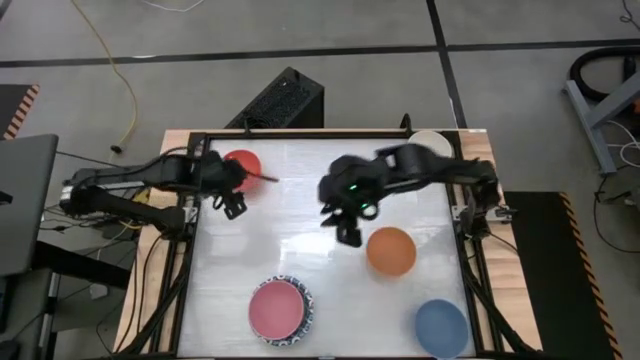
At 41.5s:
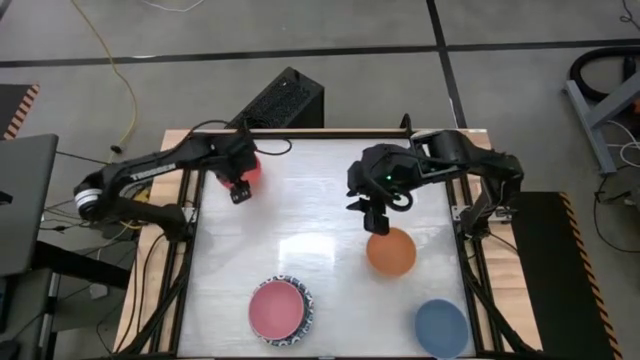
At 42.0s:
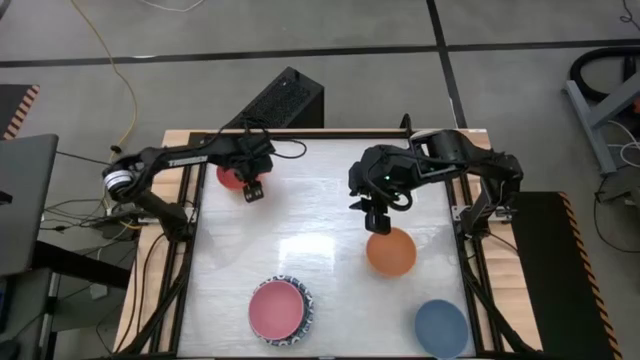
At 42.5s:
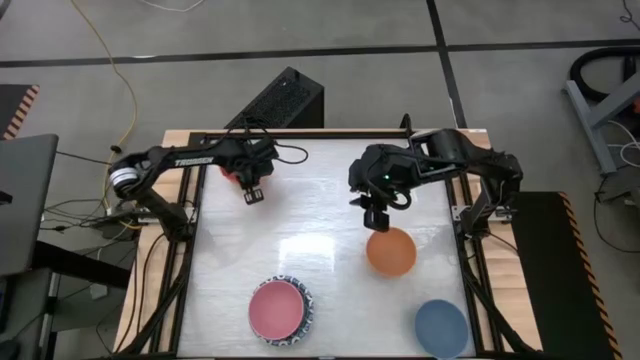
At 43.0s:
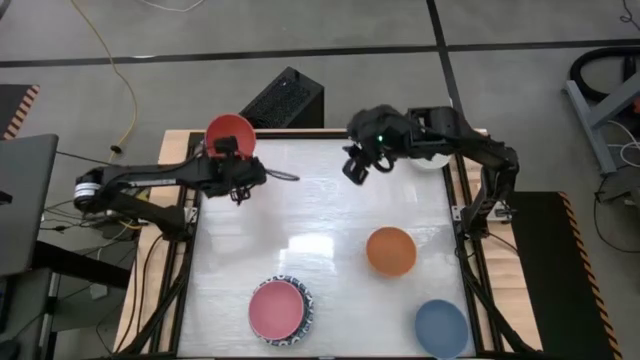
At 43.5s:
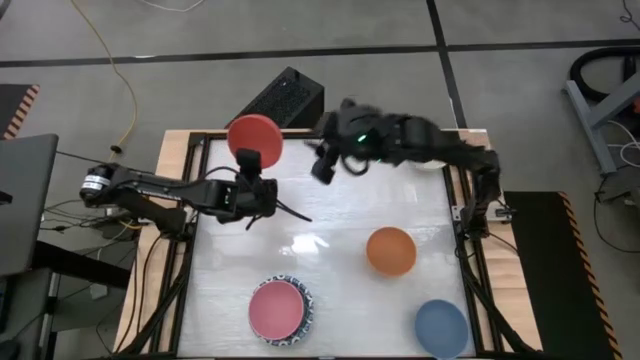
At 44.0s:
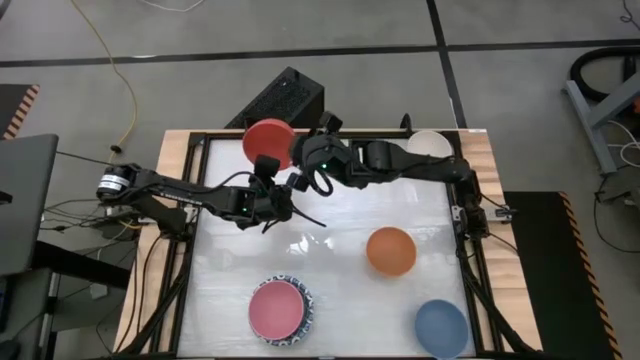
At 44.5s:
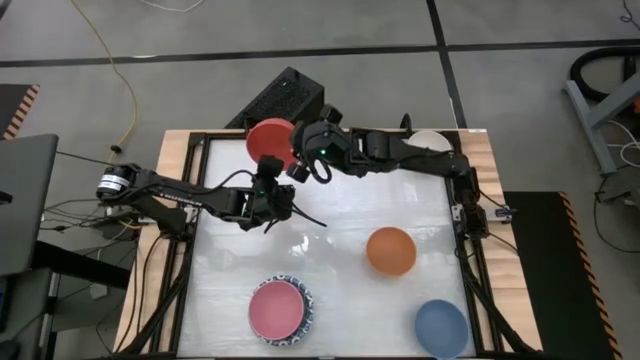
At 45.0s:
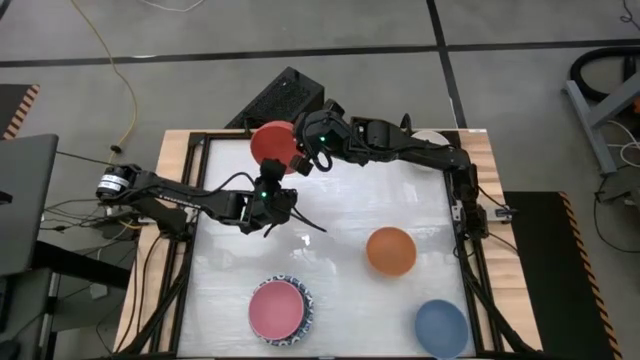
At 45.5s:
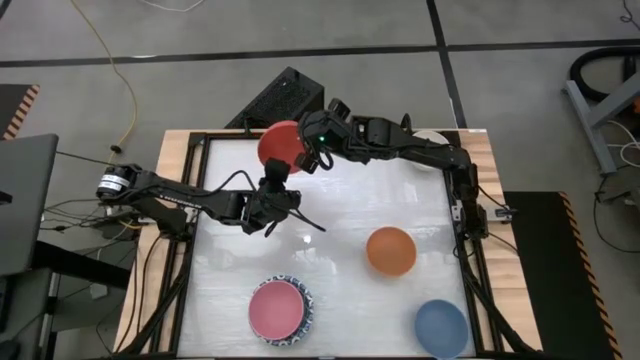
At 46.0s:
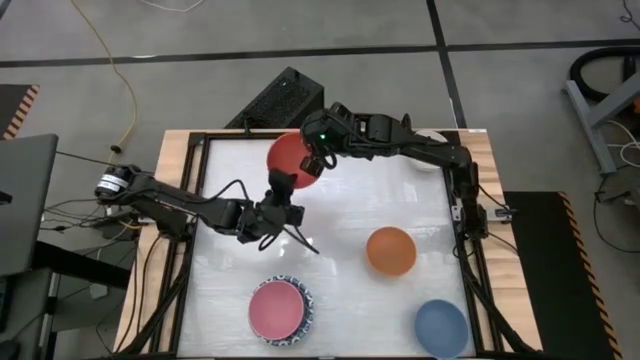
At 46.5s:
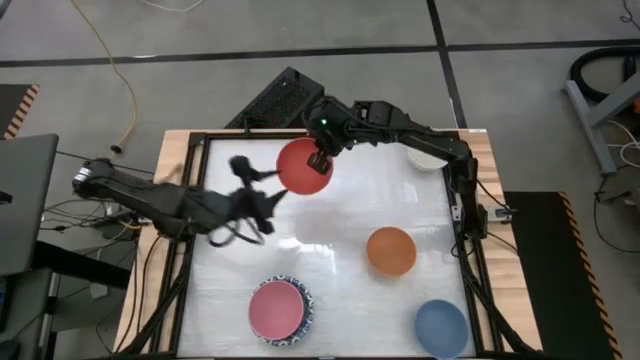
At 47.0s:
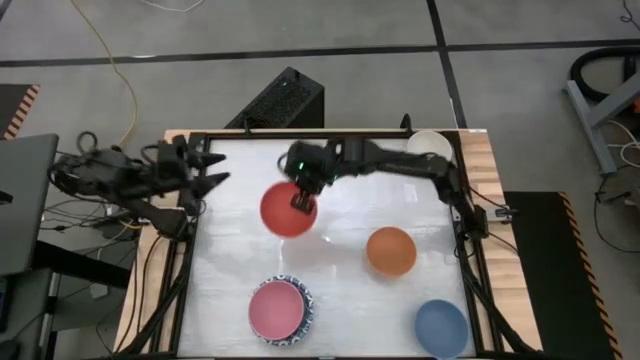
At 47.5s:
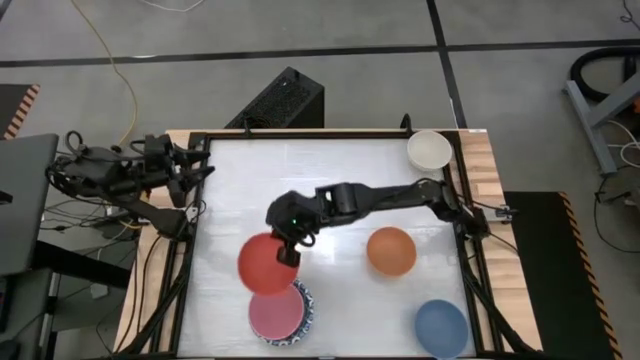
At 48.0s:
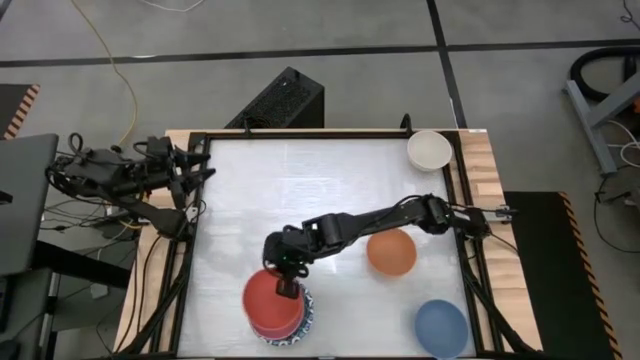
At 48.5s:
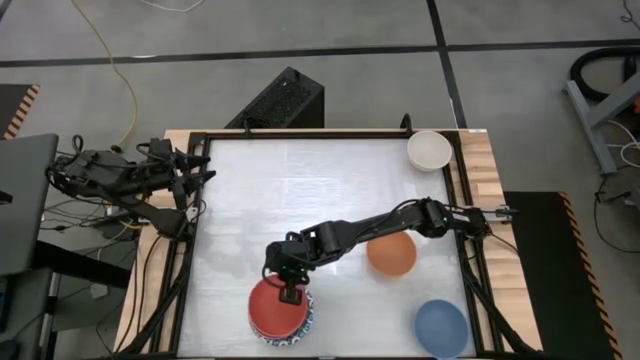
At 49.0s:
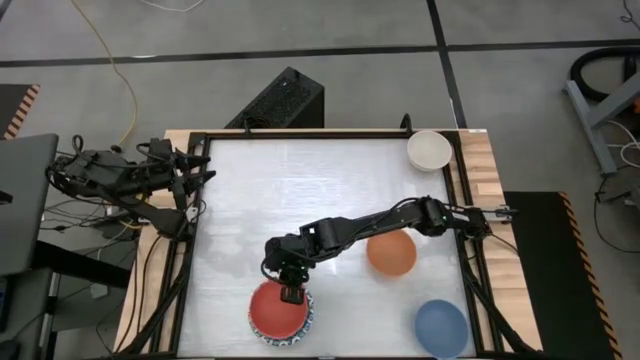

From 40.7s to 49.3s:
Stack the orange bowl on top of the pink bowl

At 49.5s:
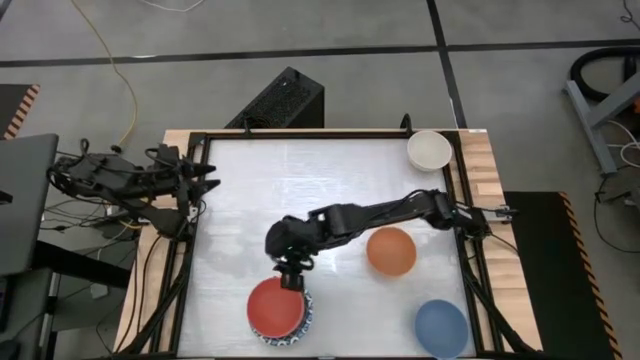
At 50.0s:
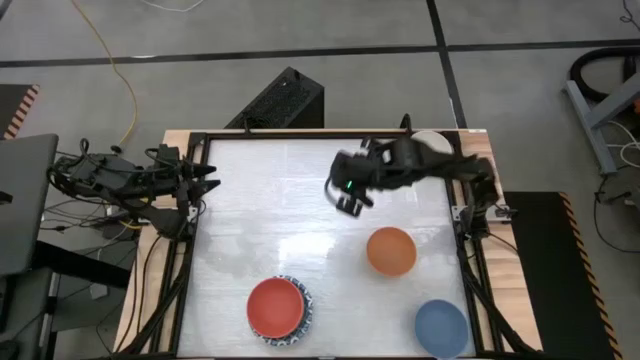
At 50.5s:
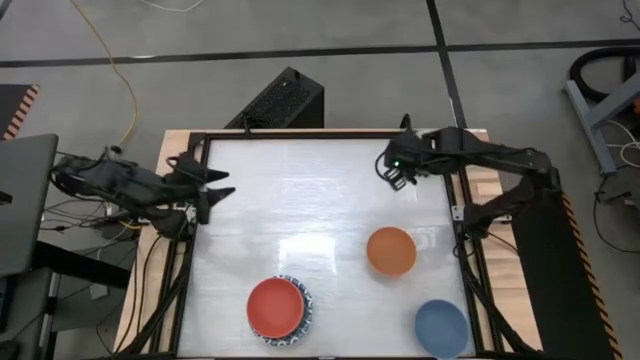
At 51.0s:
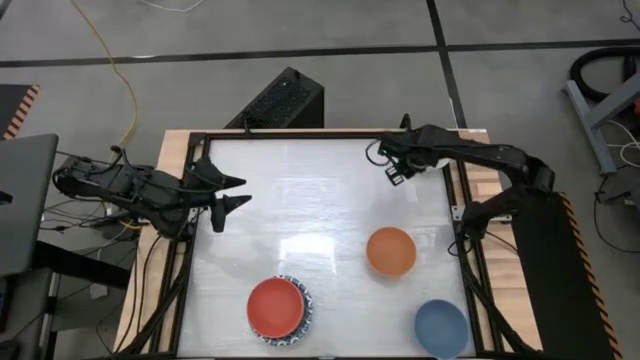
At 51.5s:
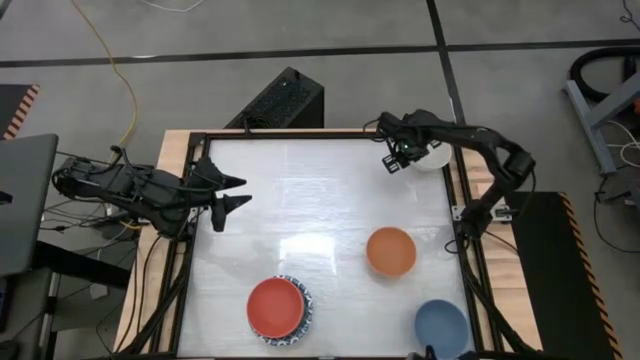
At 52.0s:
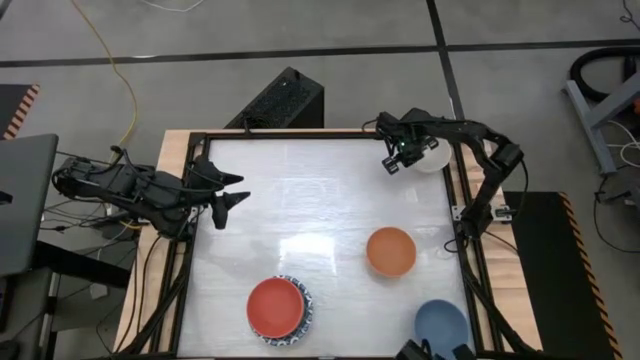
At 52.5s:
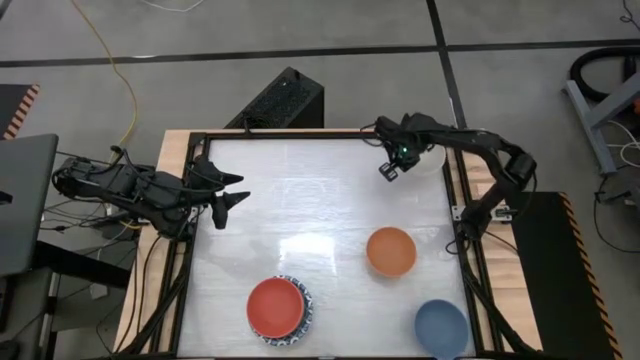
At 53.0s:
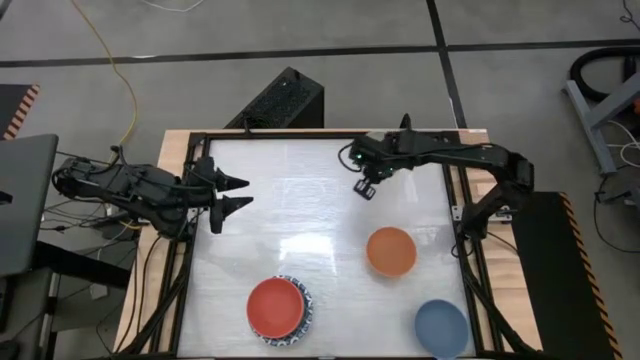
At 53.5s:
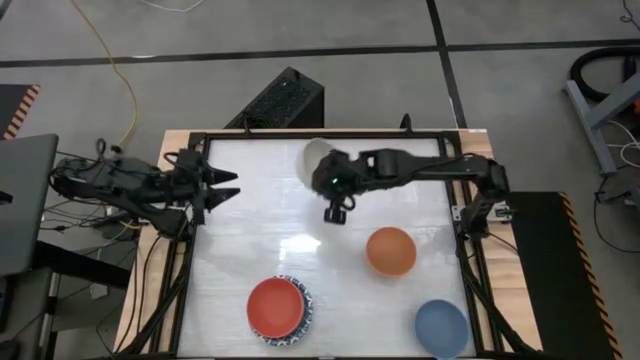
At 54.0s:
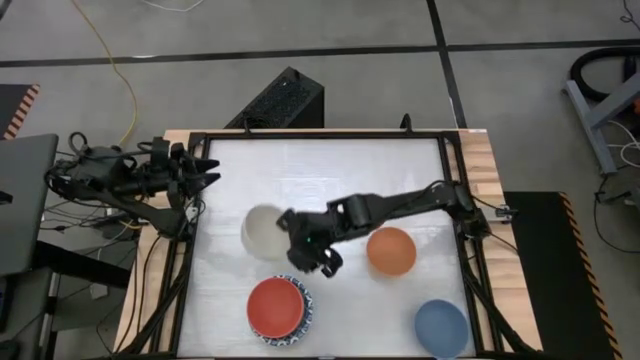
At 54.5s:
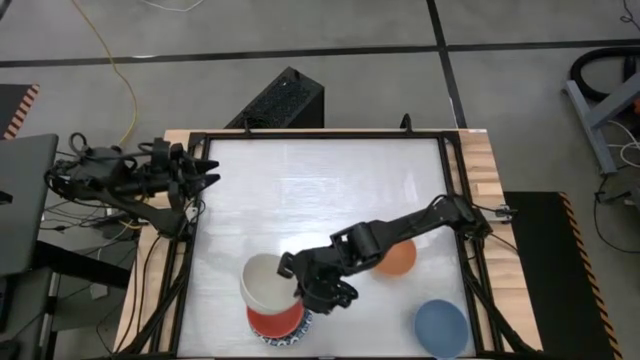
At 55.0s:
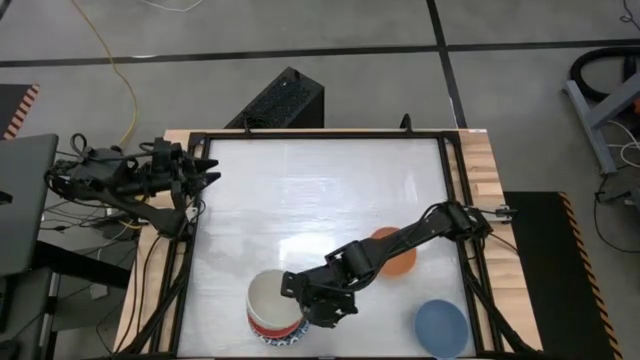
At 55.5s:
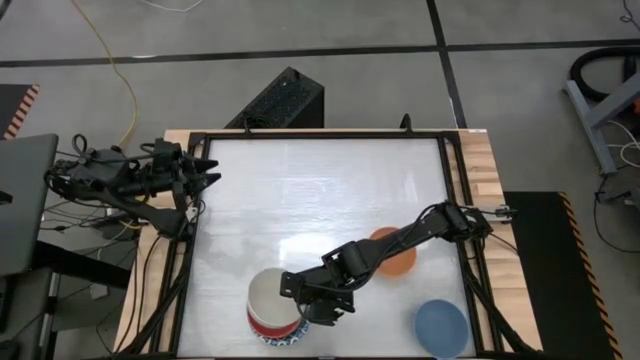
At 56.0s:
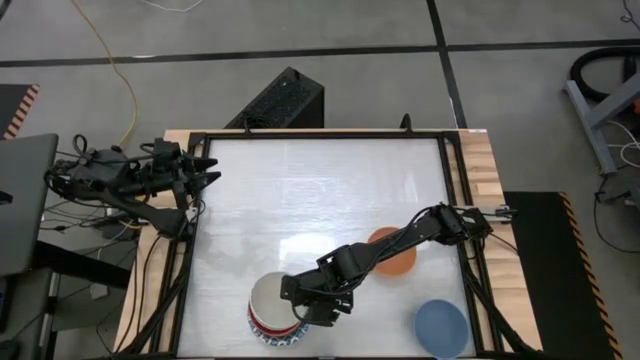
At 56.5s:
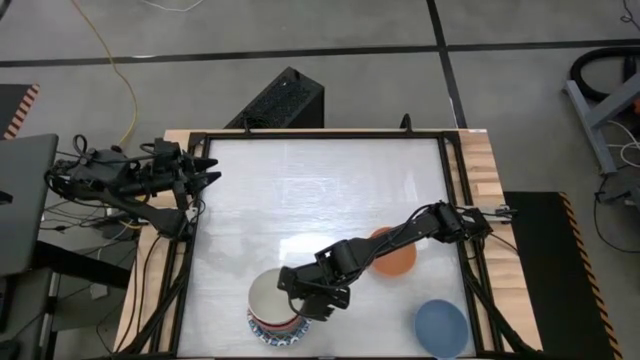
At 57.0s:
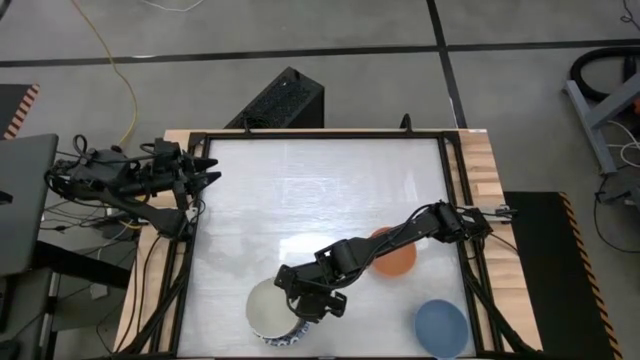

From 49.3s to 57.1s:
Stack the white bowl on top of the orange bowl

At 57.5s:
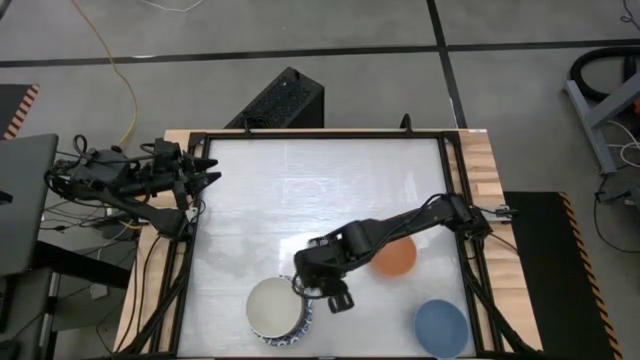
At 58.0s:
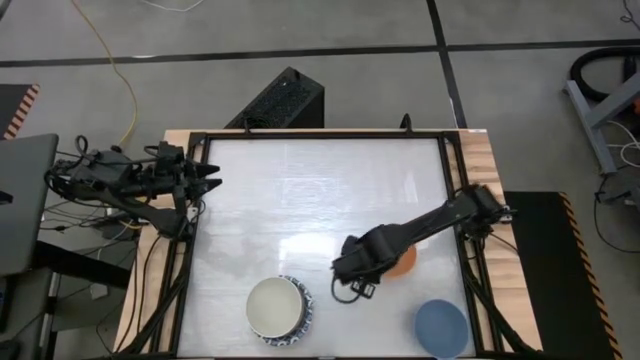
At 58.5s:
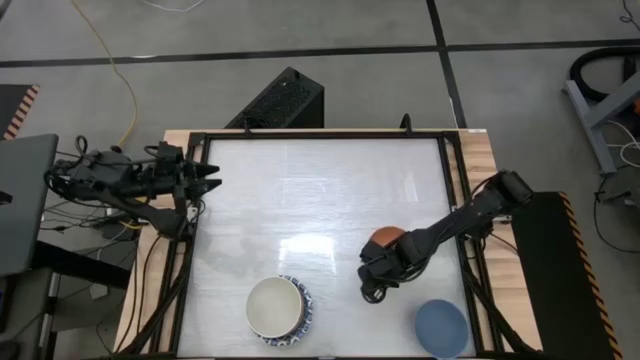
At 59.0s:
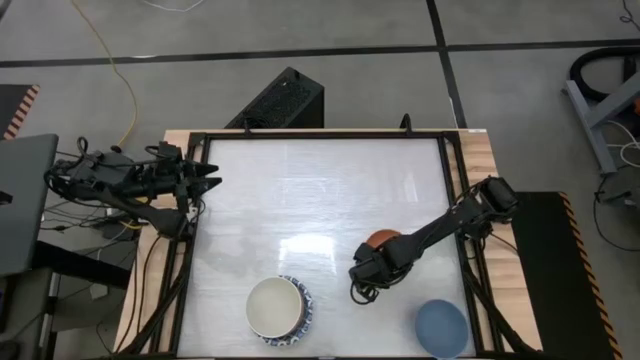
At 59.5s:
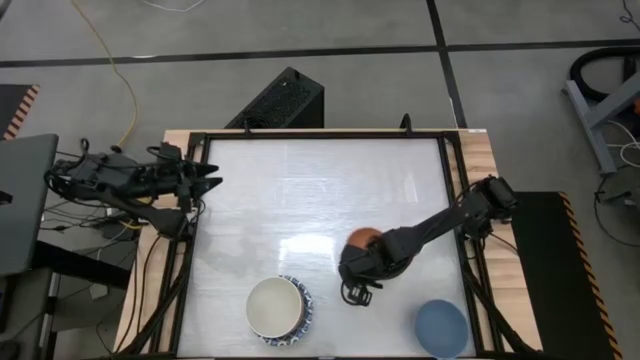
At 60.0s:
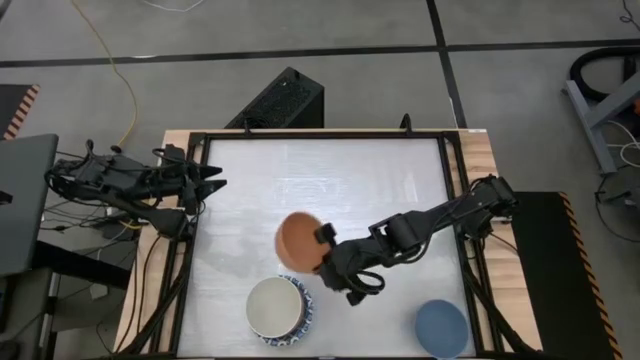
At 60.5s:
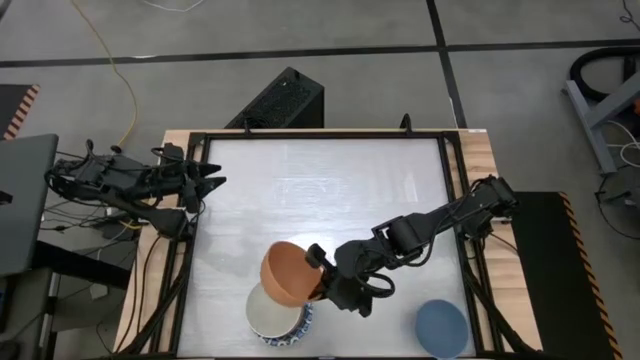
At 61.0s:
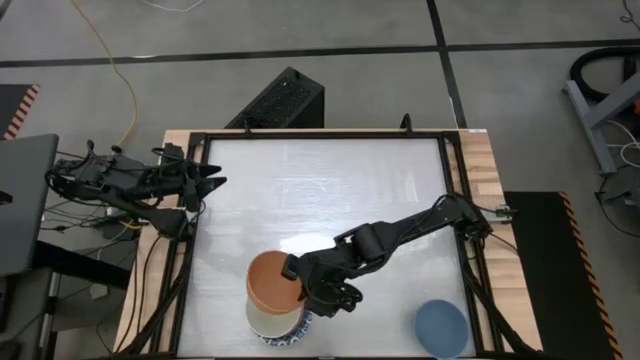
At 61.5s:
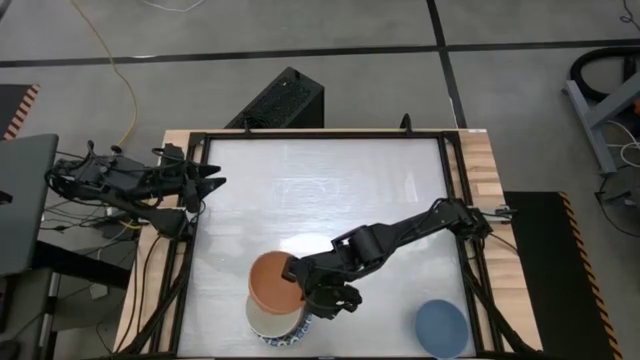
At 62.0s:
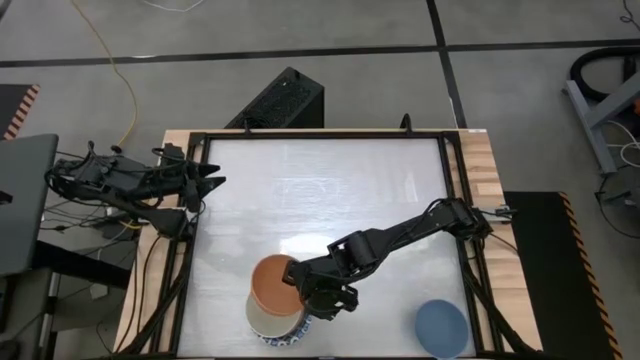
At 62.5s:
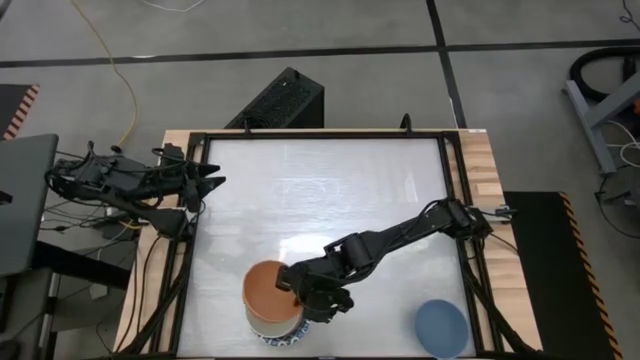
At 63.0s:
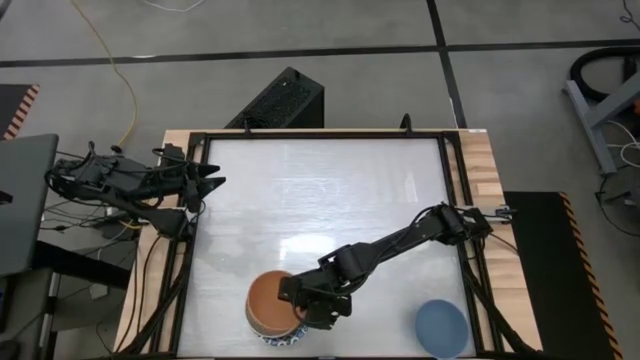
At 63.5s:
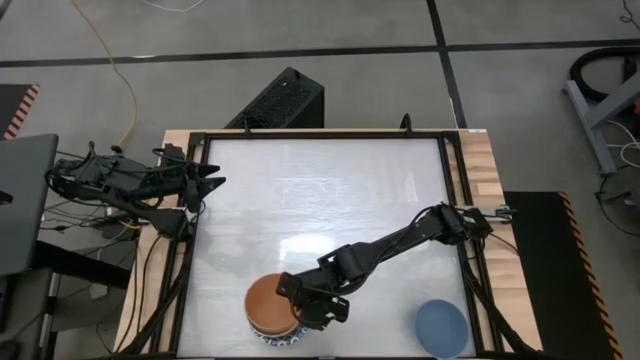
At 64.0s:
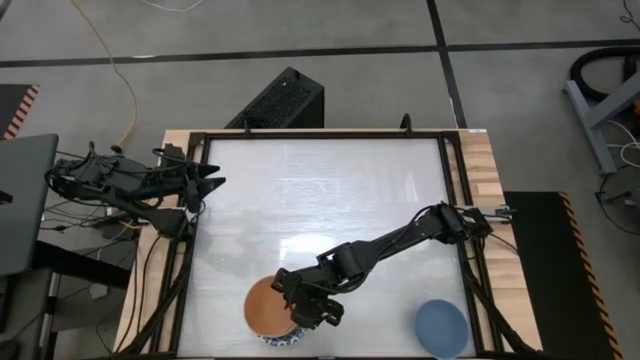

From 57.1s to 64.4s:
Stack the yellow bowl on top of the white bowl
